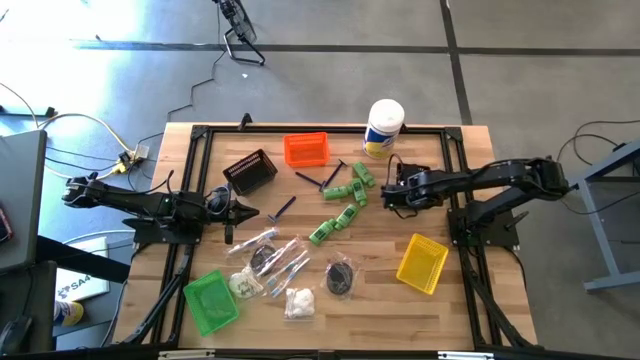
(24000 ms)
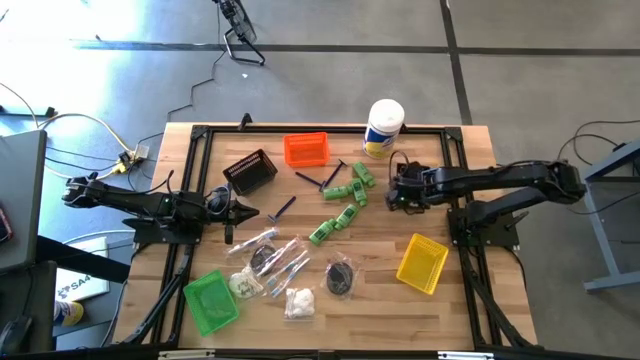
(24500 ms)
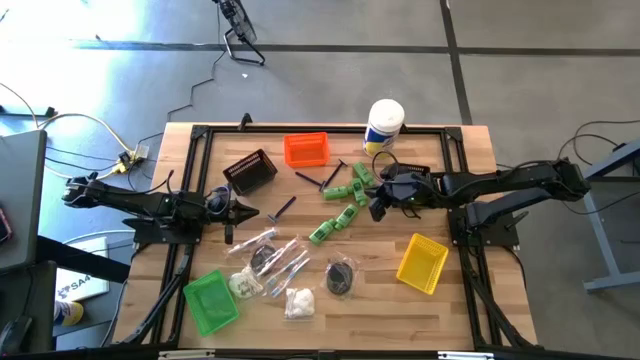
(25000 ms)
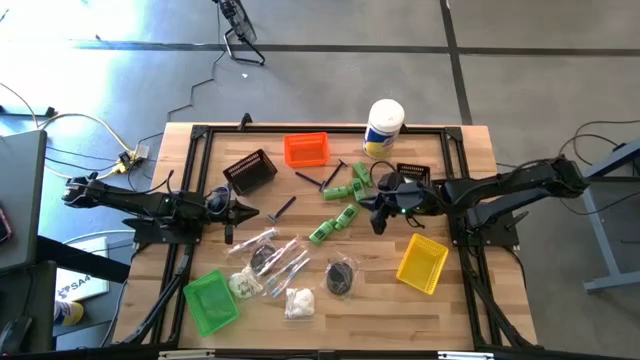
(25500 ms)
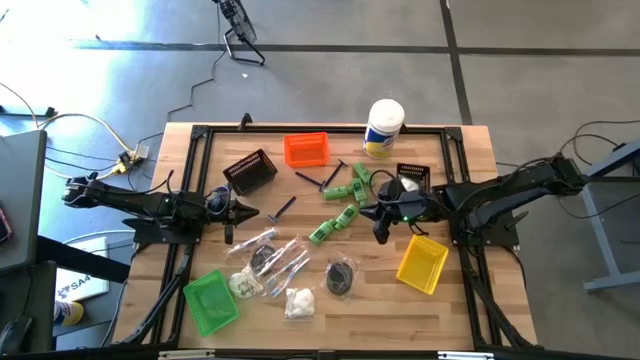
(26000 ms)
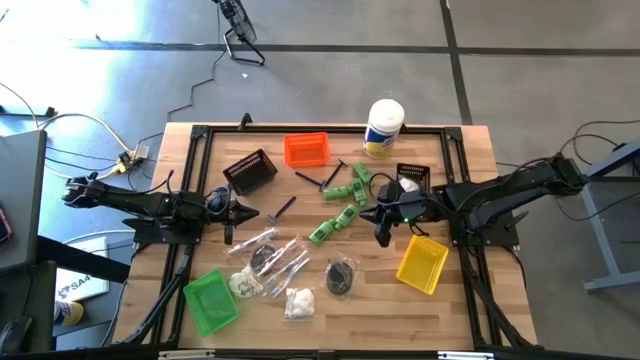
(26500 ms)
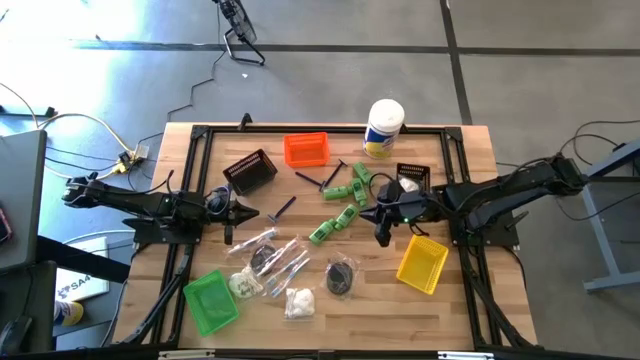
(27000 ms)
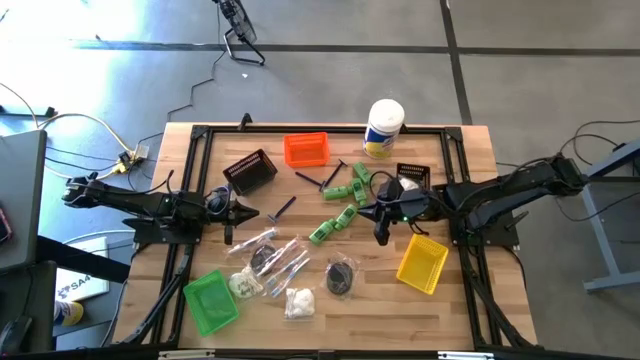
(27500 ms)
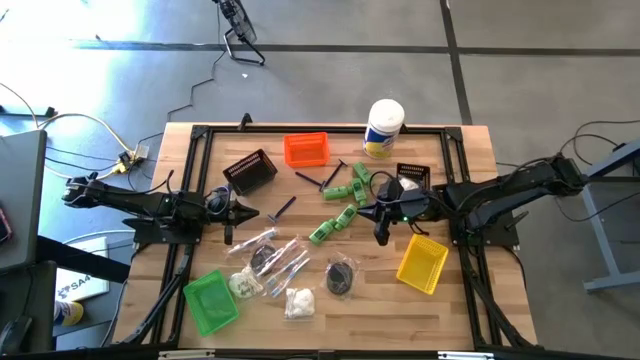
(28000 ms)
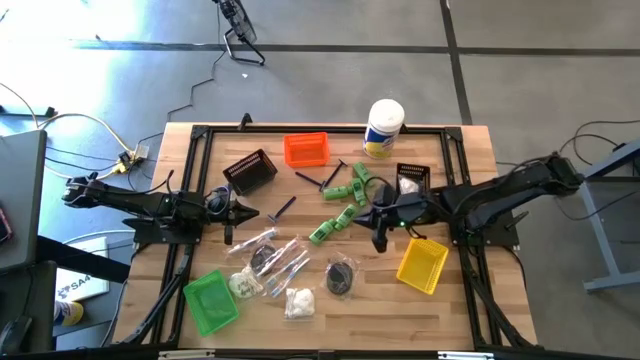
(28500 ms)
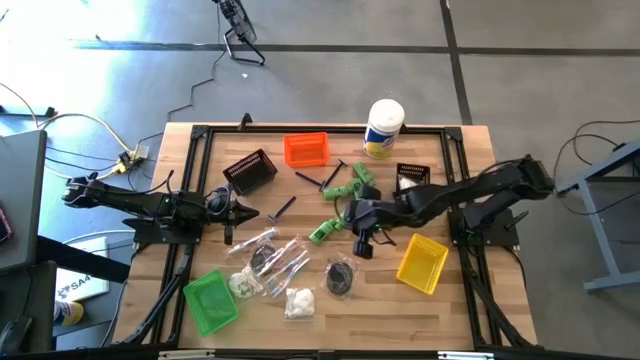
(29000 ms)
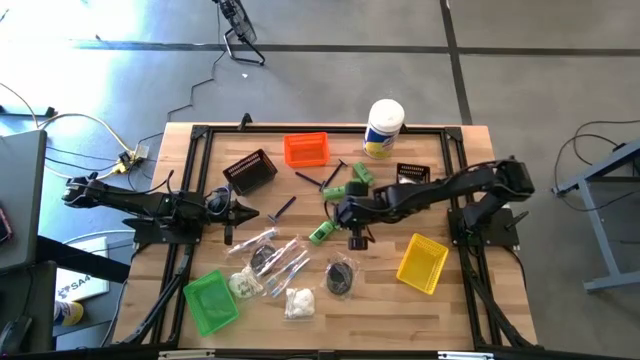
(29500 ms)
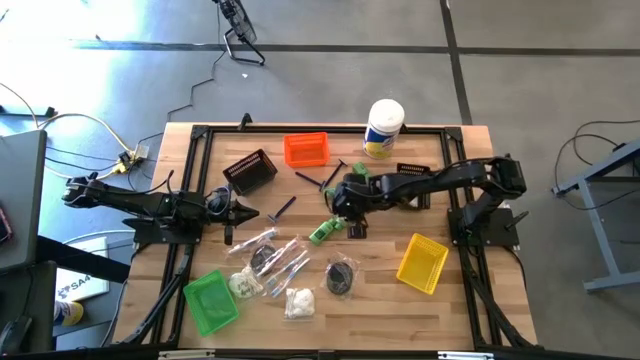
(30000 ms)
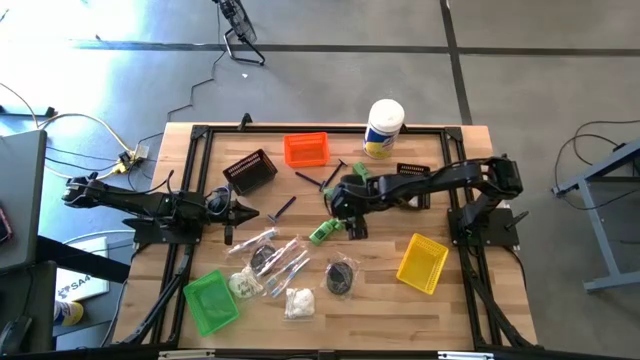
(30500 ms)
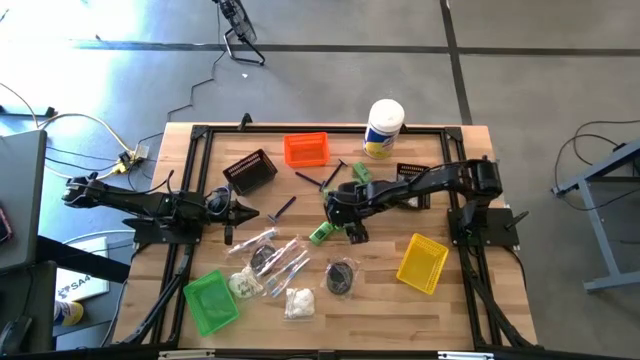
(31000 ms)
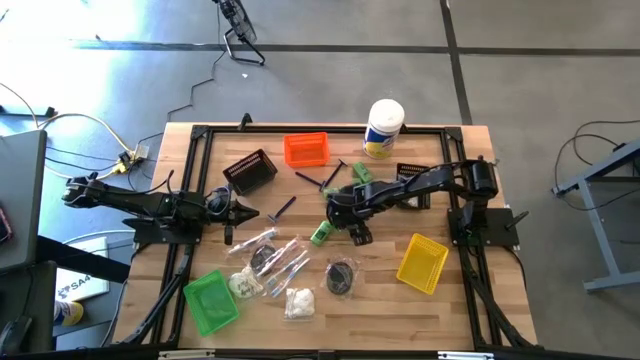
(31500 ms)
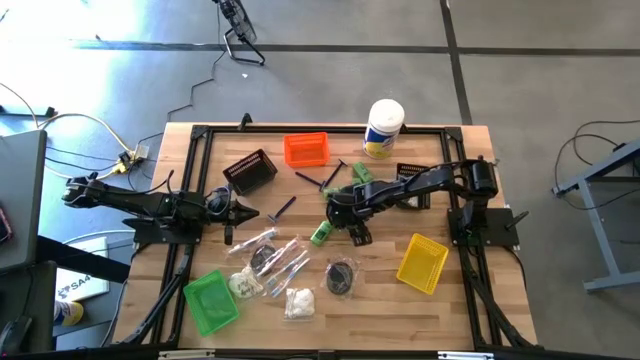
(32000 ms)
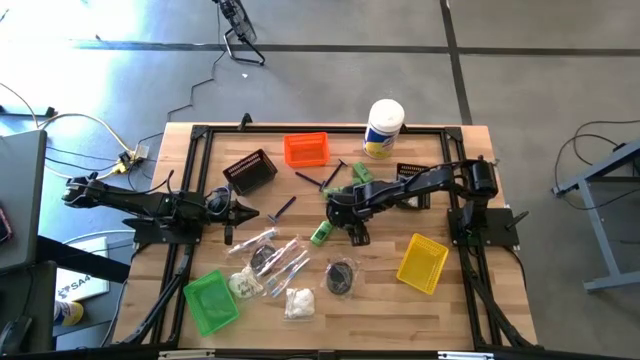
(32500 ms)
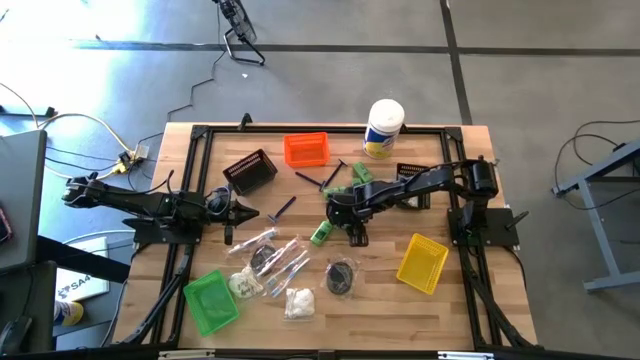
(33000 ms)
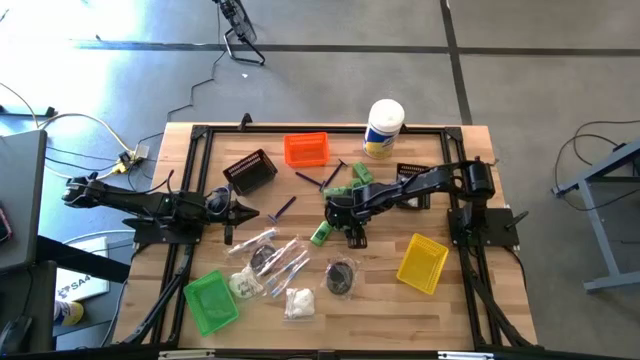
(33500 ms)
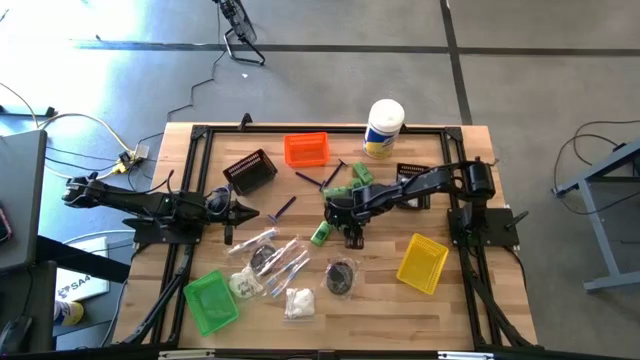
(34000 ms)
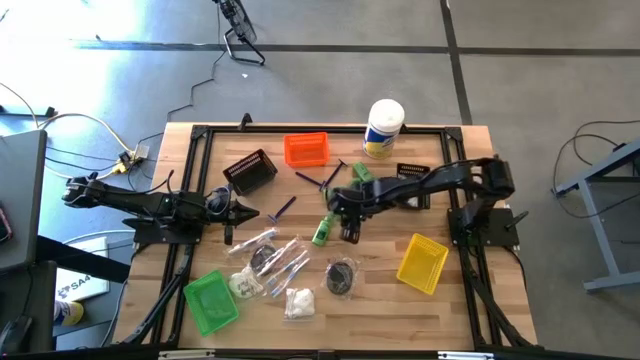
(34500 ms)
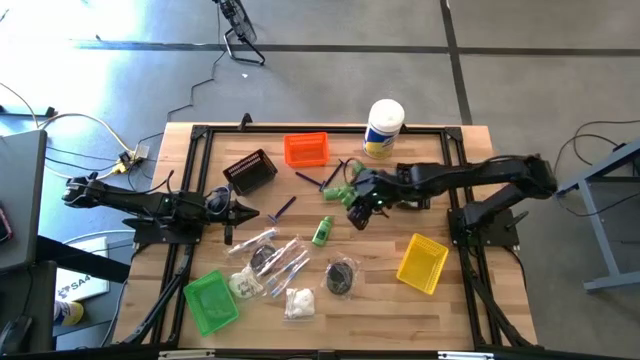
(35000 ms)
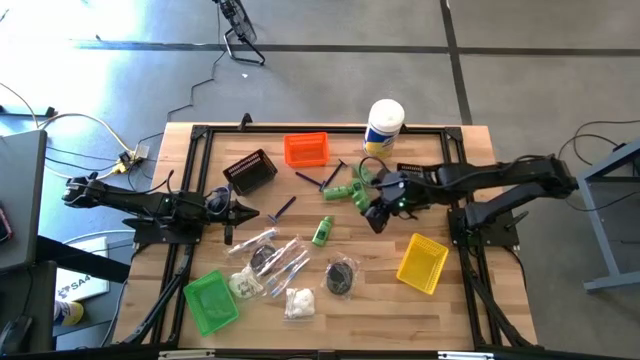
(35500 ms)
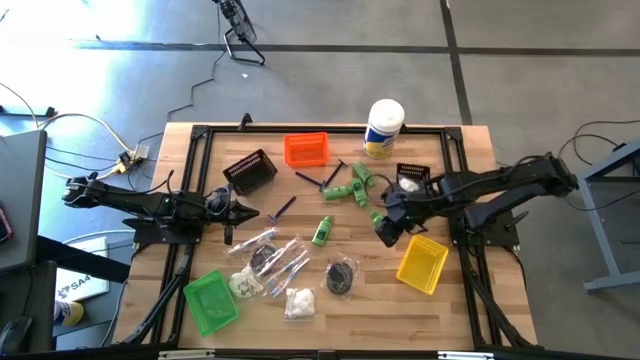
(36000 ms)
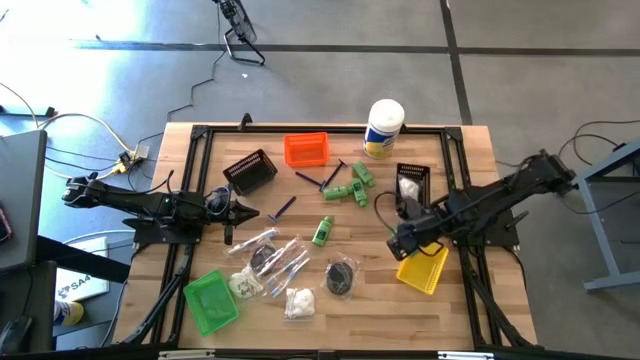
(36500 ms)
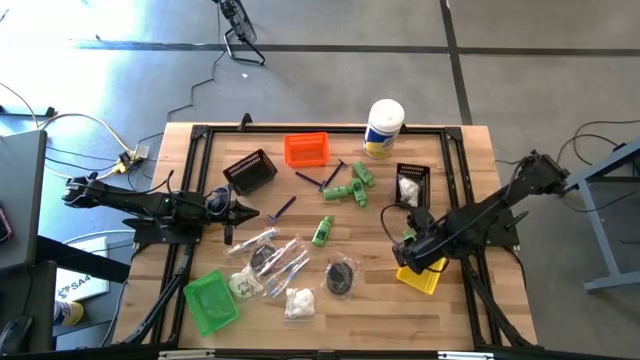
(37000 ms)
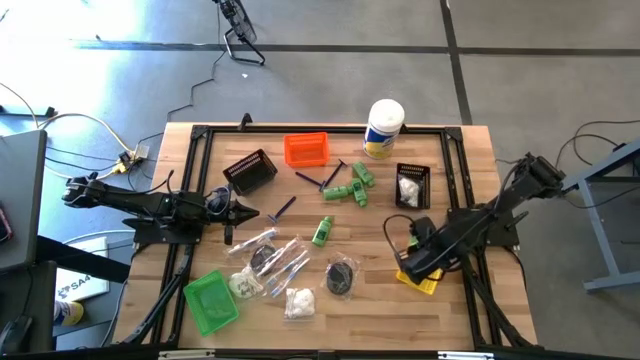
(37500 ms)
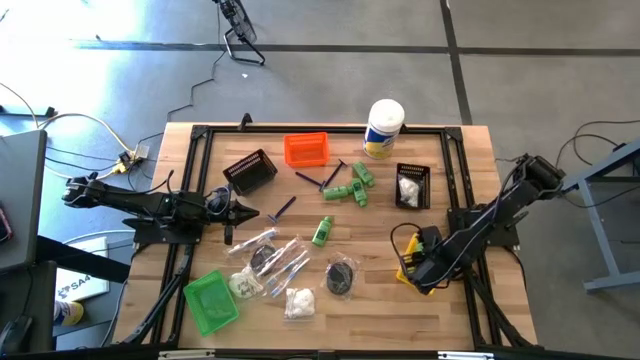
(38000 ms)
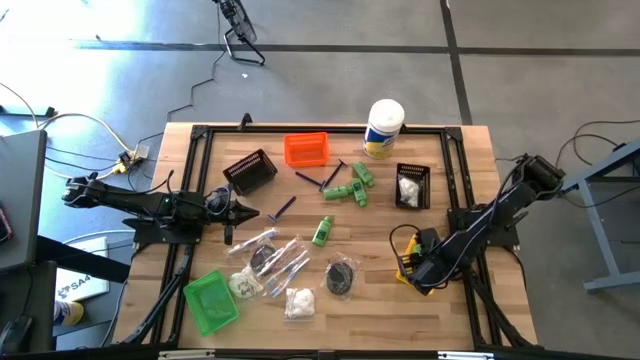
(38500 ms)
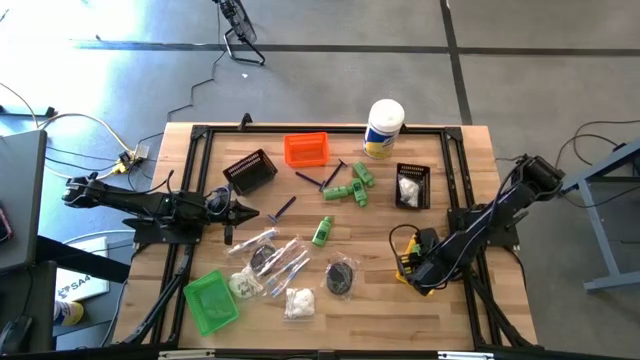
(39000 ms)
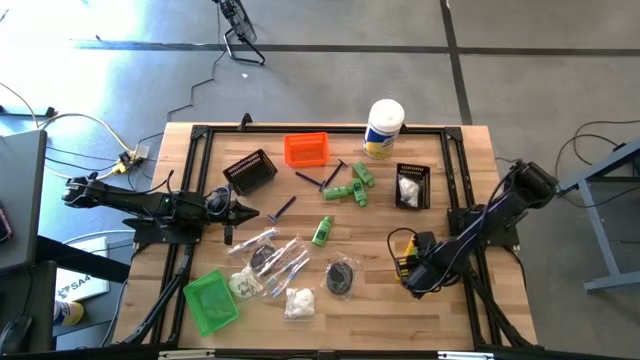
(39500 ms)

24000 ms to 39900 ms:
Task: Pick & Place Travel size toiletries
Put the green shampoo bottle into the yellow bin

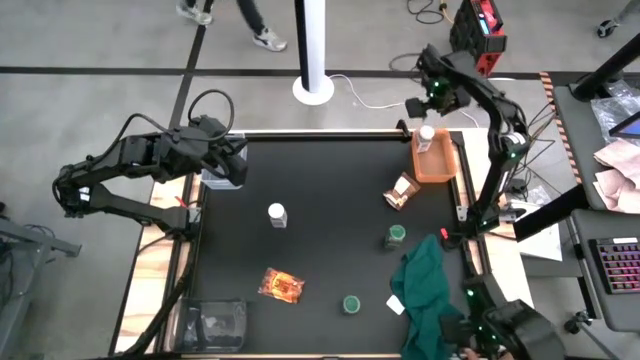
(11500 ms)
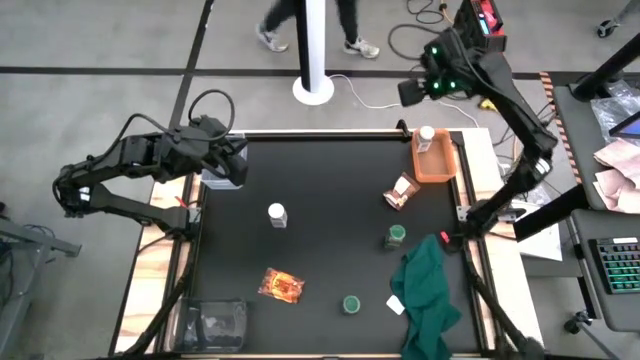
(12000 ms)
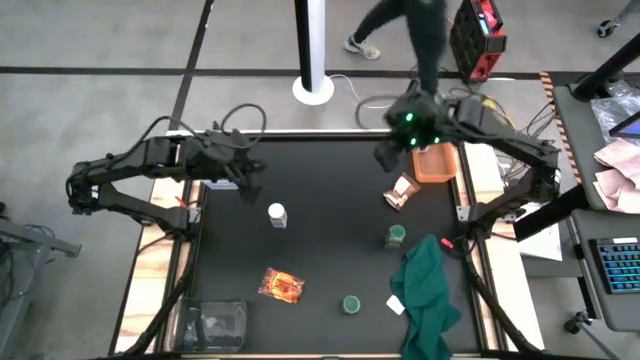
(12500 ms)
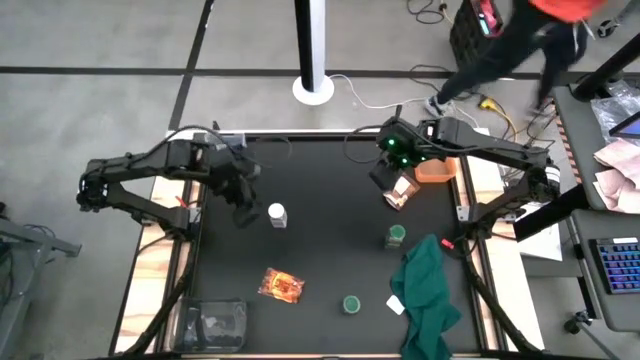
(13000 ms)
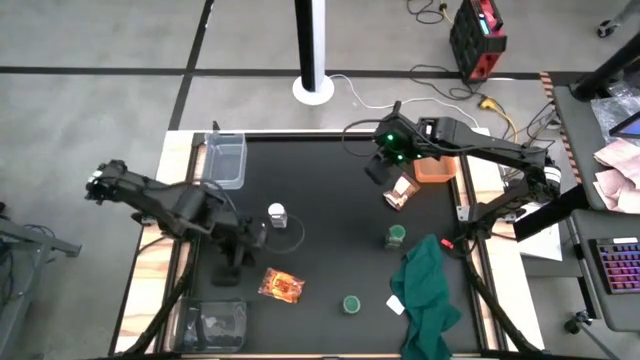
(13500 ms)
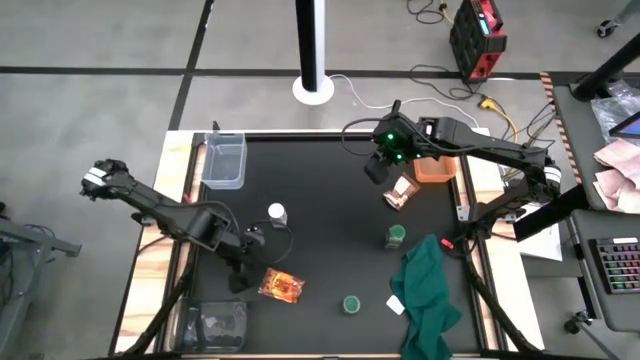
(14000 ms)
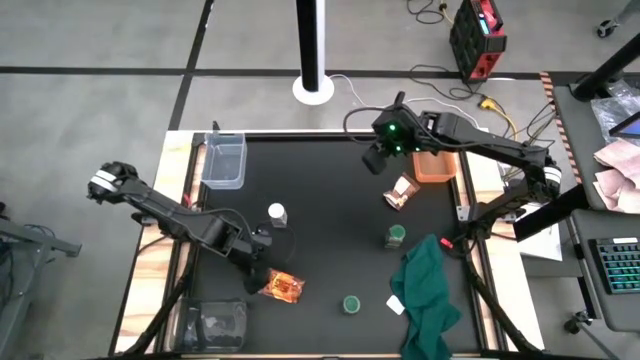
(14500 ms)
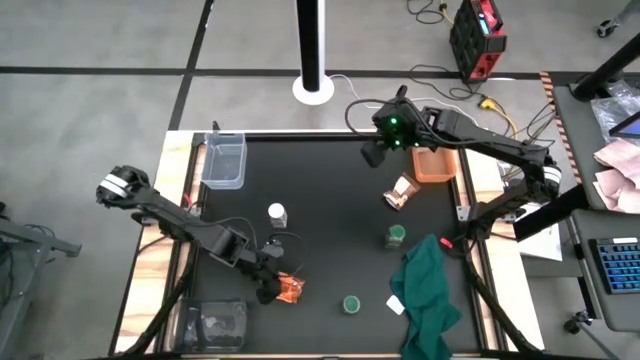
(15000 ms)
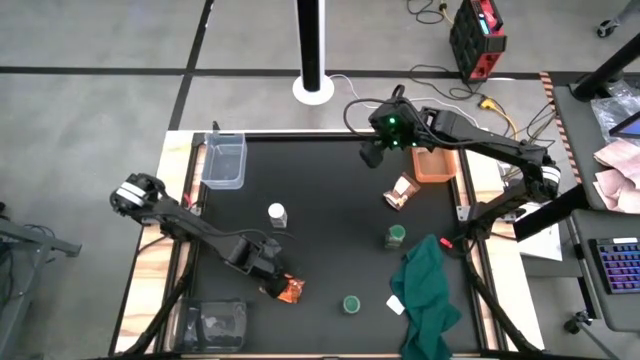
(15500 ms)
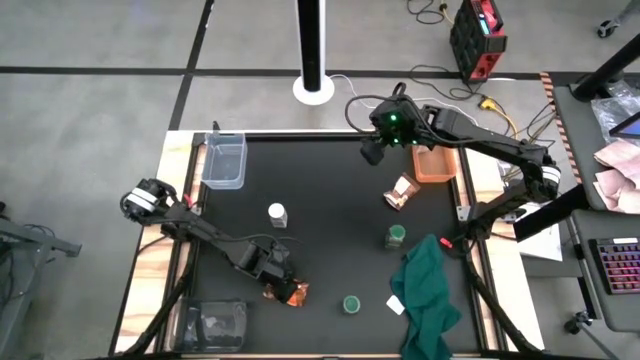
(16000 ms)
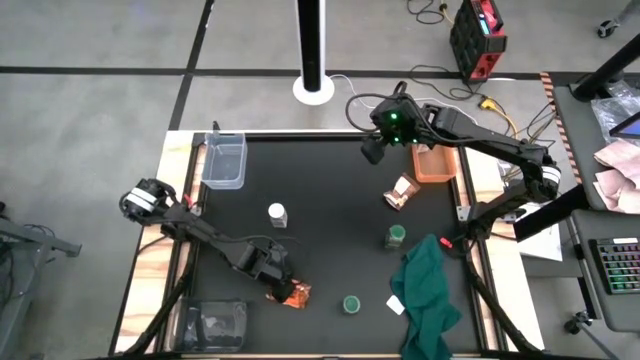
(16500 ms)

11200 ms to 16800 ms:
Task: Sort spices by type
Put the bottom orange seasoning pack into the transparent bin
